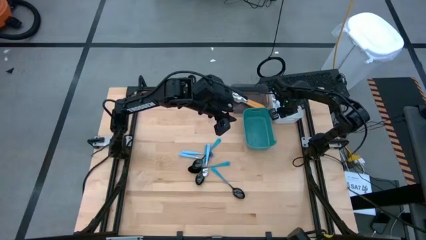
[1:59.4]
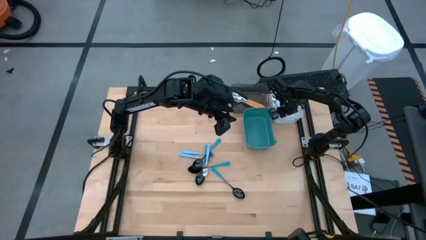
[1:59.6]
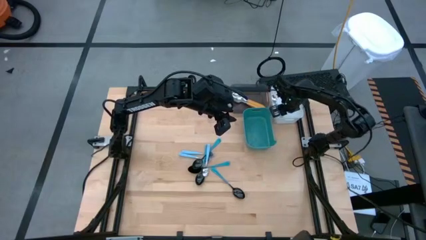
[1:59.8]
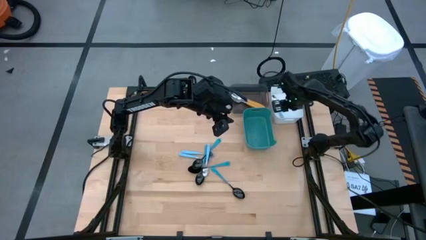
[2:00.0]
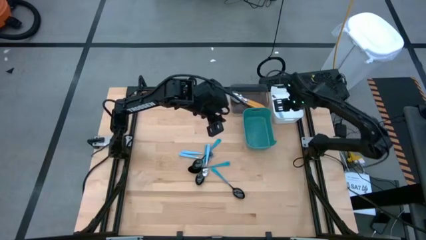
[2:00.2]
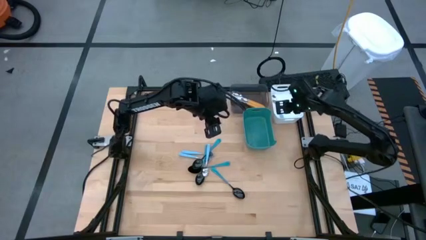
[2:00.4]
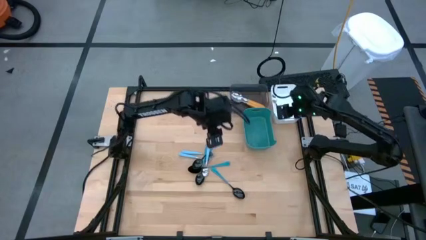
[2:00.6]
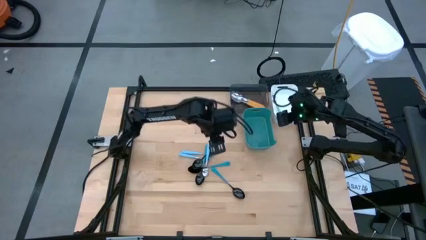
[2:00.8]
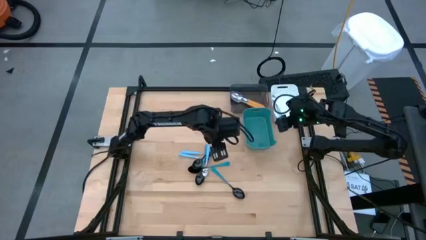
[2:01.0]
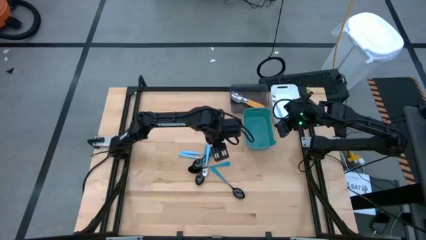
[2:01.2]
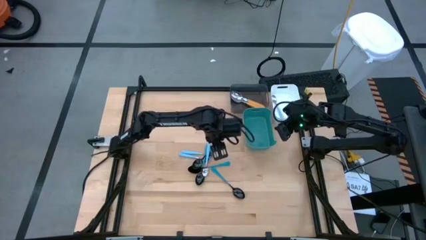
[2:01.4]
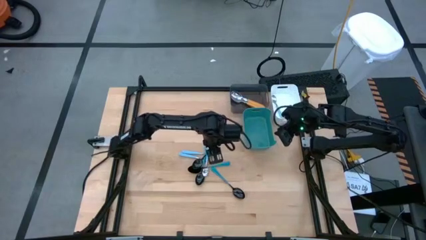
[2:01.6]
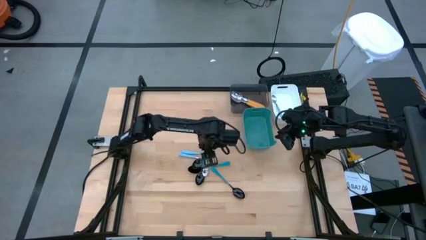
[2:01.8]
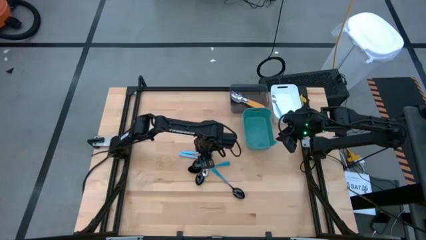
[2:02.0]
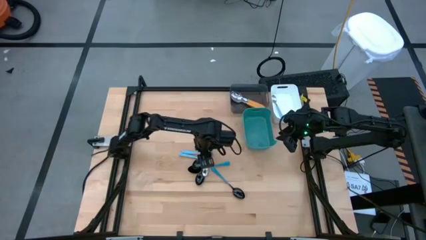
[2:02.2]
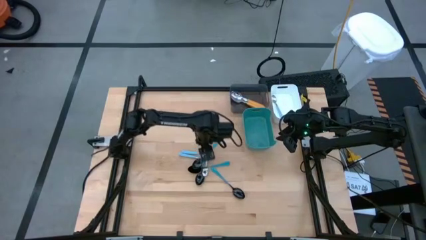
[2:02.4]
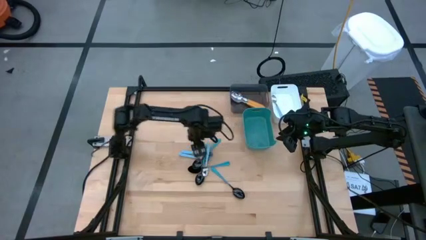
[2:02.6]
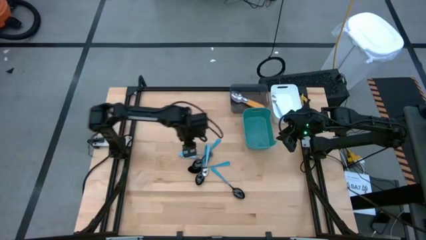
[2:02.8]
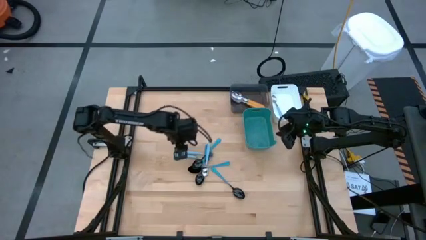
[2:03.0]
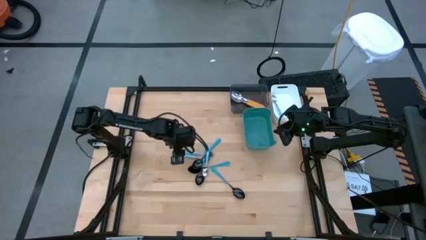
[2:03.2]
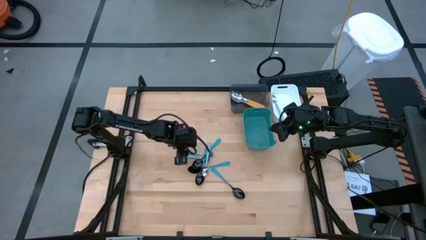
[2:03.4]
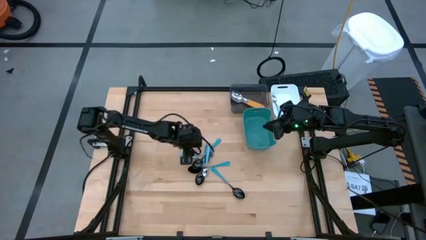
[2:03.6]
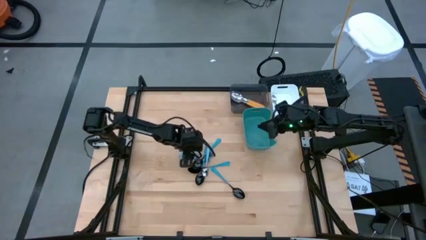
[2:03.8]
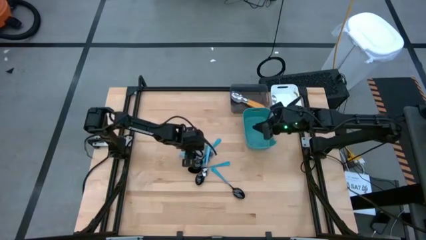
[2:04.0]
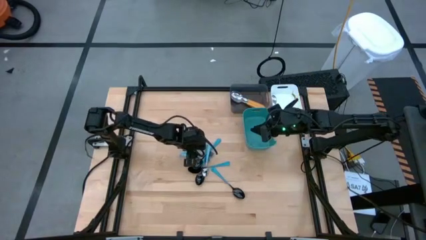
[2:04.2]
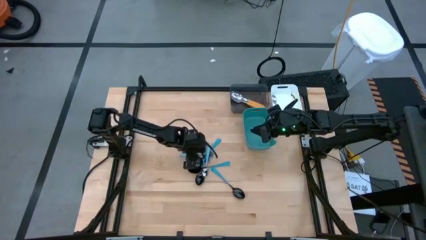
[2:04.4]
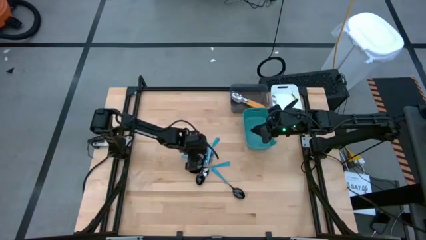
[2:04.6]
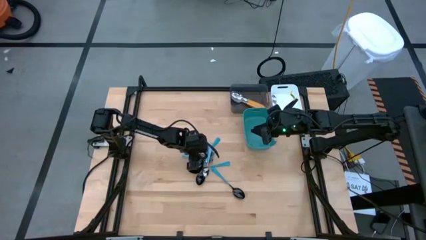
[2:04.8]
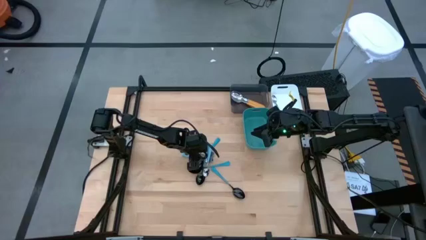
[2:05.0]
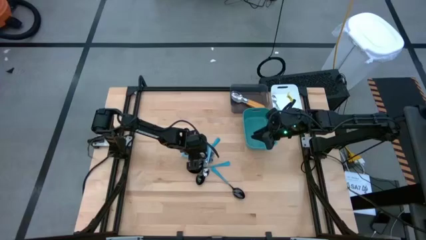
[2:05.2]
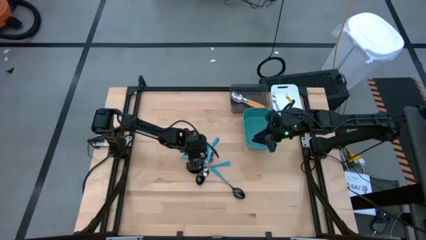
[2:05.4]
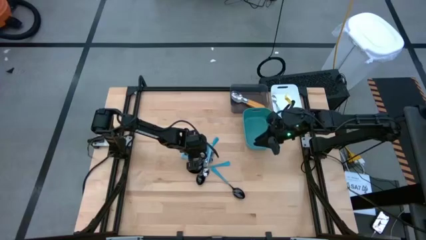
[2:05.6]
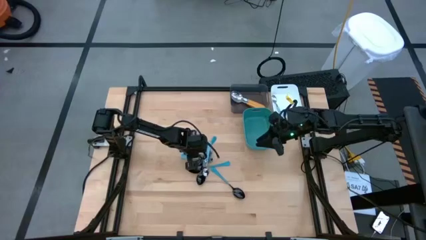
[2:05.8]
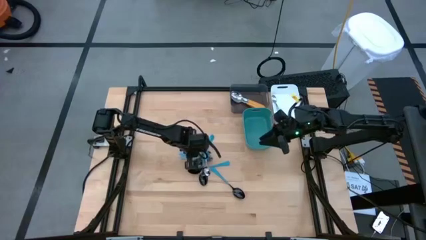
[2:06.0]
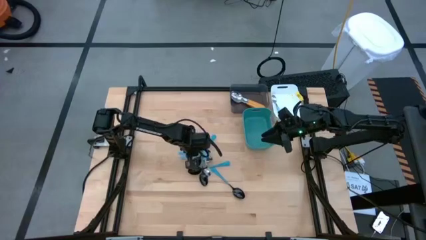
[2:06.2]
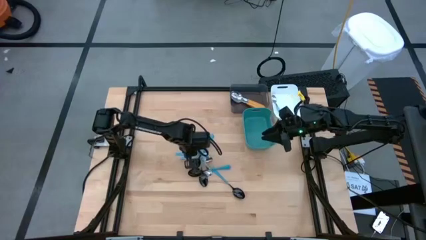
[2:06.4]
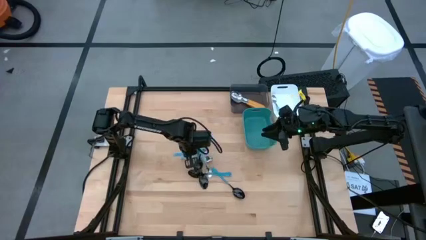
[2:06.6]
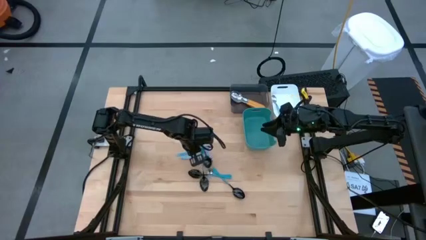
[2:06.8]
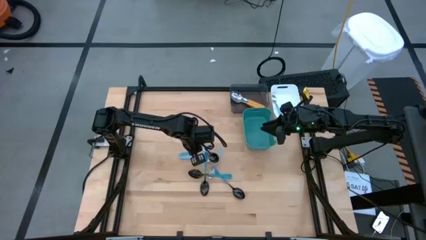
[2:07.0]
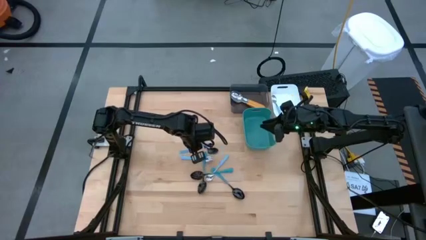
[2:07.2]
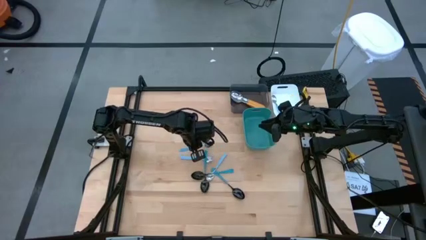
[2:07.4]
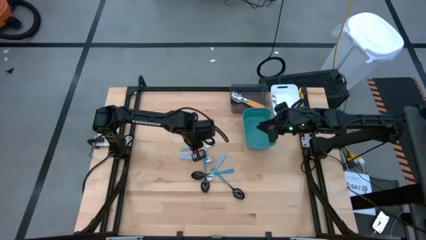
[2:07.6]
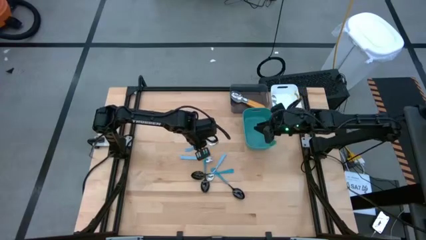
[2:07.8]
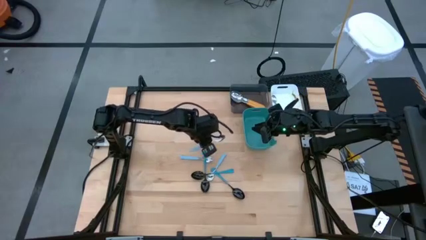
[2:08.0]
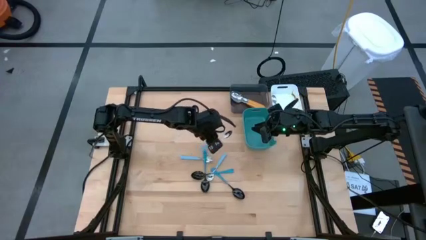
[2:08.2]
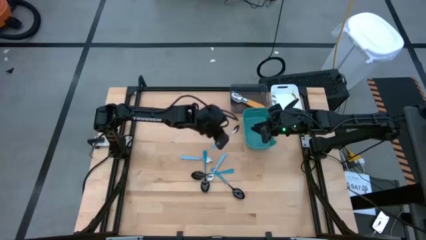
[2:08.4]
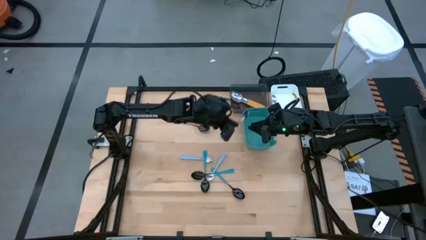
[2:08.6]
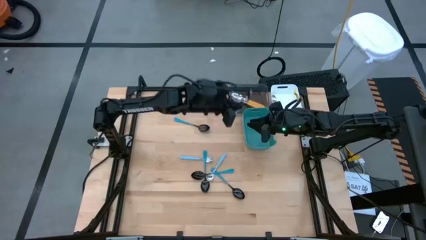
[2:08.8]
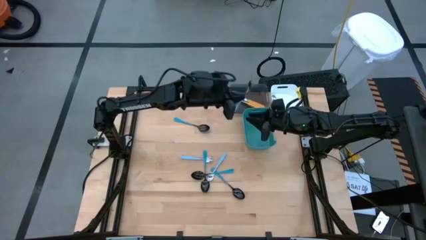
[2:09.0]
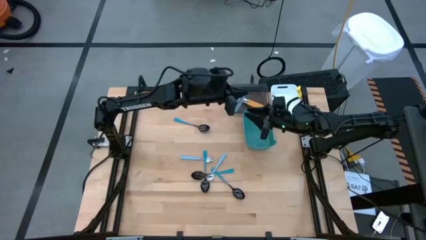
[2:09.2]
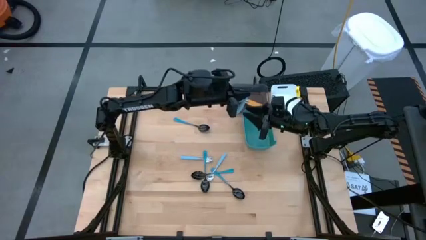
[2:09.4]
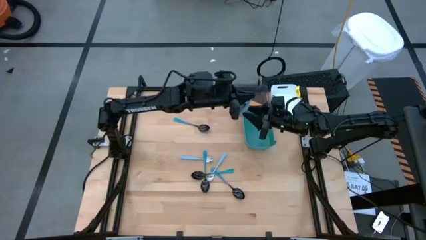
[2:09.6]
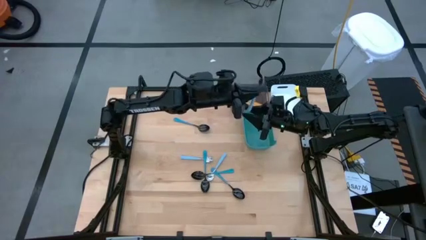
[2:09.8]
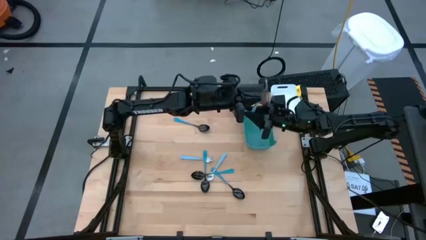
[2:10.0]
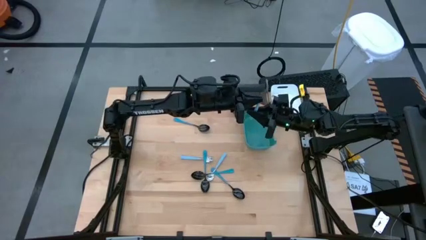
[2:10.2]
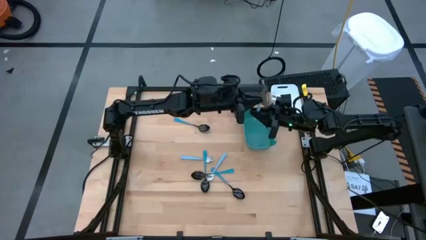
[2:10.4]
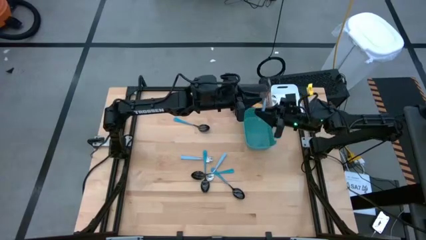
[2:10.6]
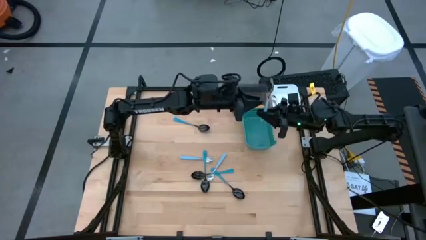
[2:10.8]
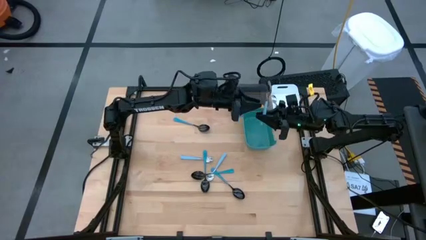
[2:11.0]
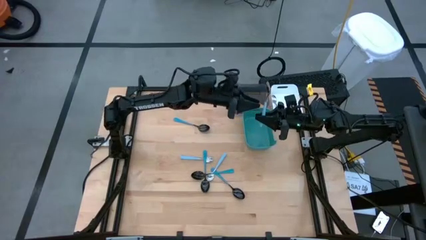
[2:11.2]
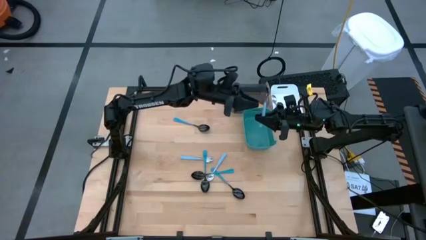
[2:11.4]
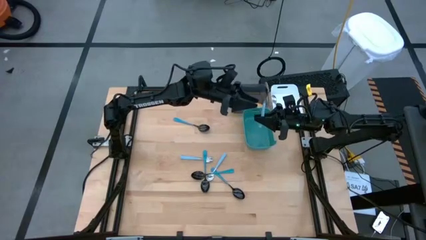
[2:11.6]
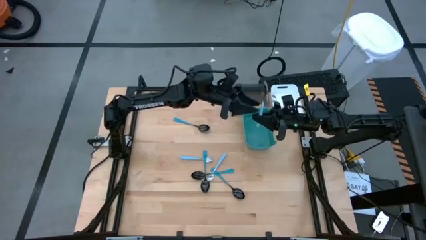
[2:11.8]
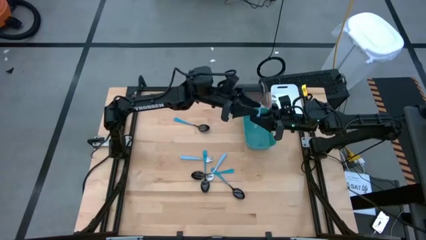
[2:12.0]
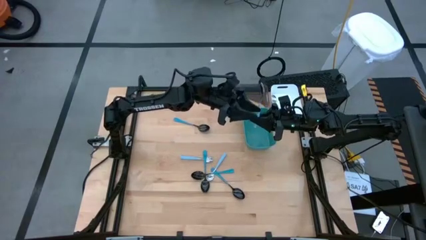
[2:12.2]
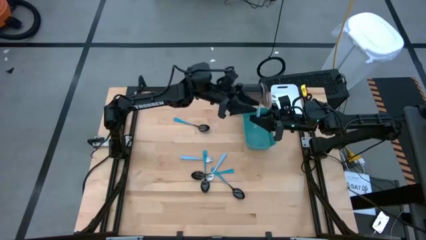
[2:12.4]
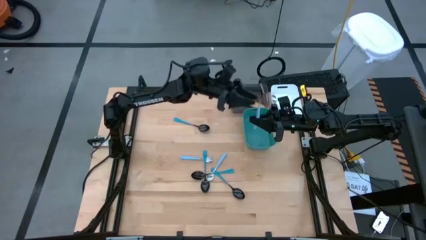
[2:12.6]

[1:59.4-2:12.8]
Task: Sort silverware by color (type)
Put the light blue spoon into the white bin

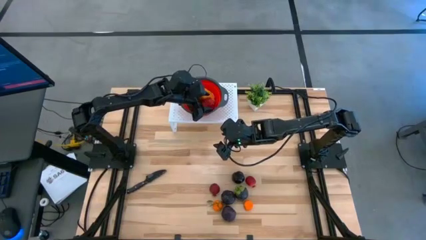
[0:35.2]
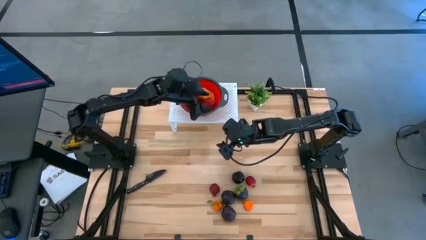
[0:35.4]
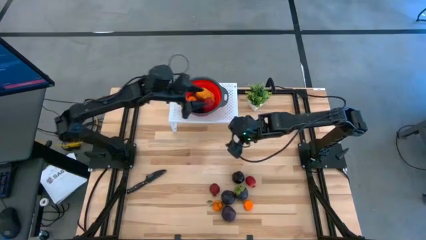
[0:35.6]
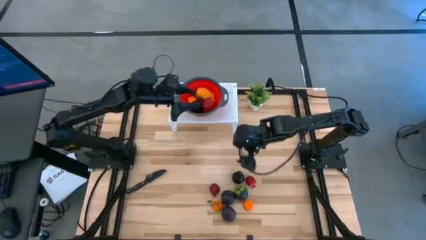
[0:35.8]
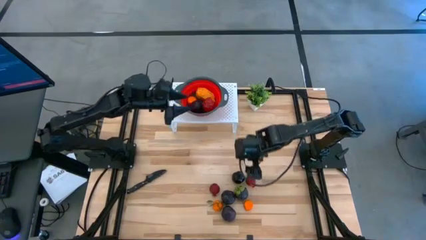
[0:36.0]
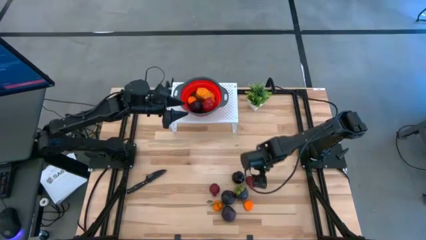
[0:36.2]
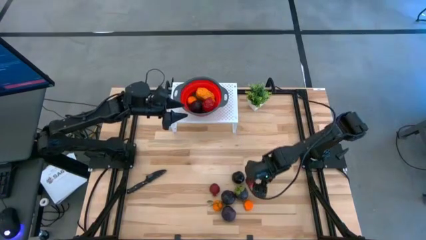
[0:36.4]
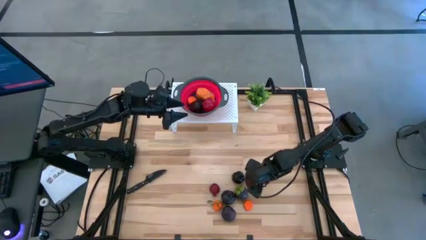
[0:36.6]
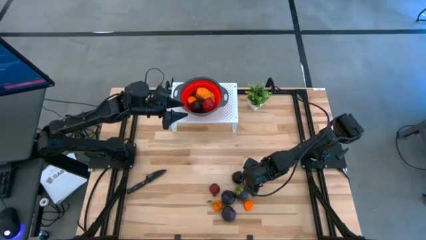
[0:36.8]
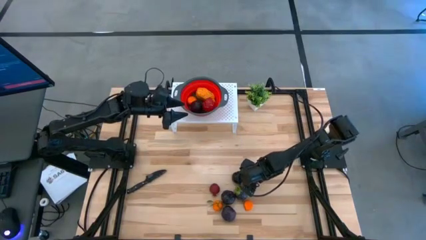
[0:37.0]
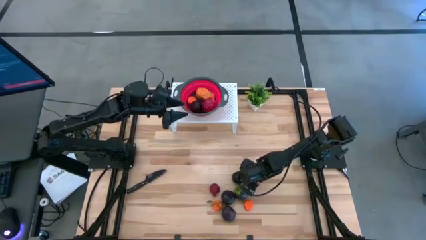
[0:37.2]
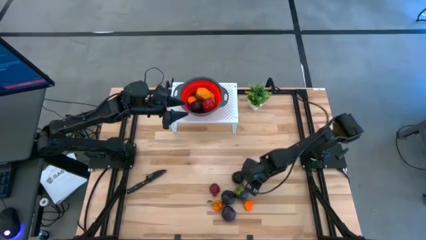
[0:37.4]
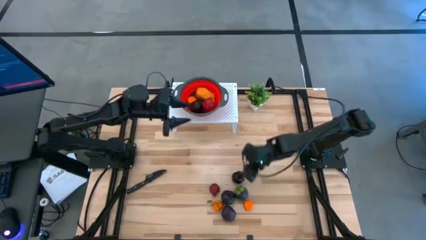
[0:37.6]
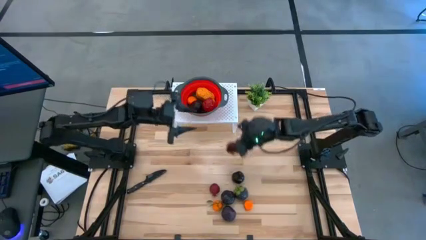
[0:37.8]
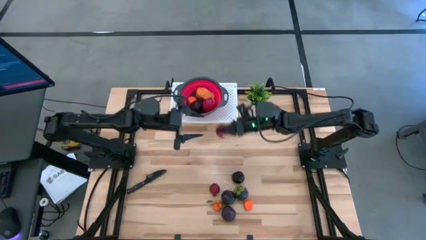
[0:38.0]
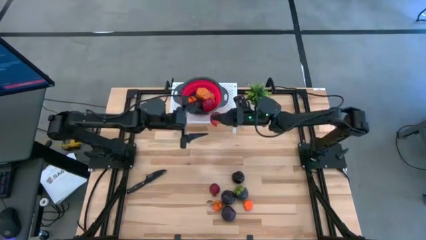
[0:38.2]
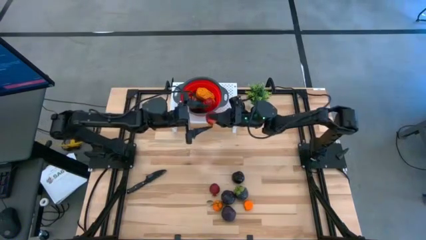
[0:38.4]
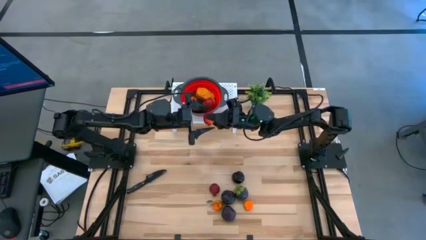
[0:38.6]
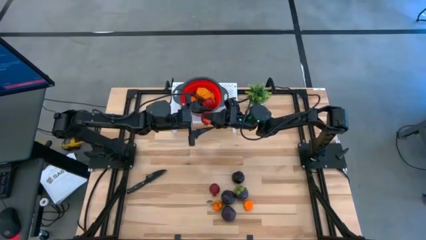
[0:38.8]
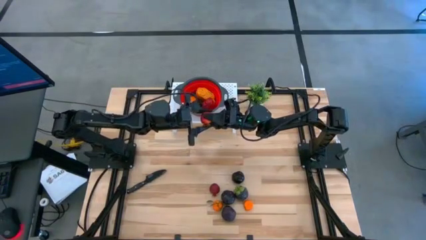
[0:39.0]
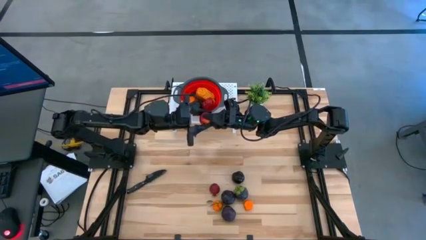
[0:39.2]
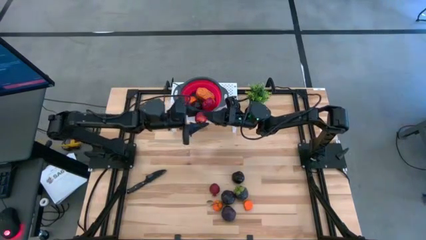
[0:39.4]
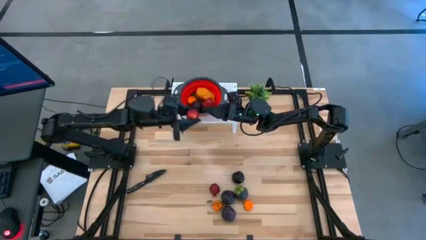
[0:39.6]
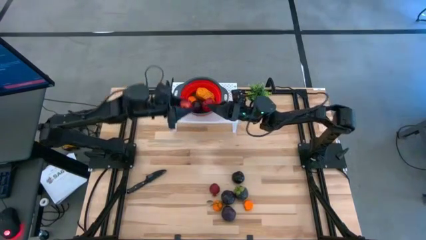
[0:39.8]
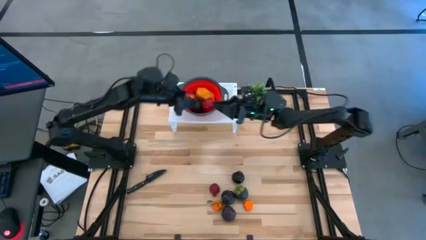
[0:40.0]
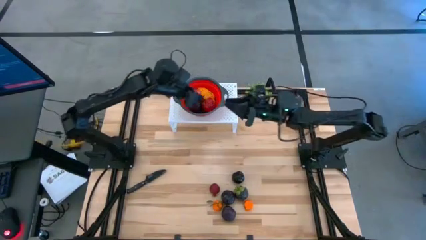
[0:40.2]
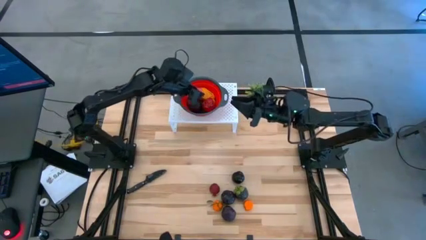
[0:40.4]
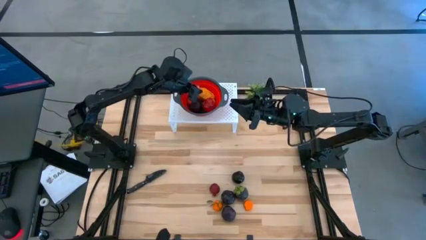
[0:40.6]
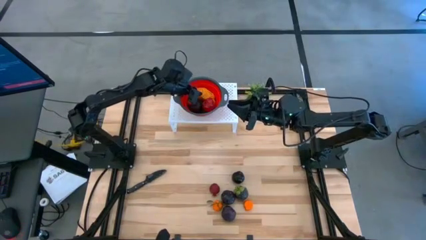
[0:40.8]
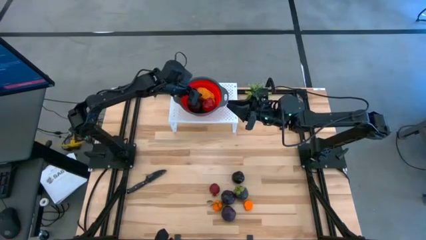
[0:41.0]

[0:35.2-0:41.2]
Task: Pick & Place Fruit
Put the red pomegranate into the red strainer bowl on the shelf
